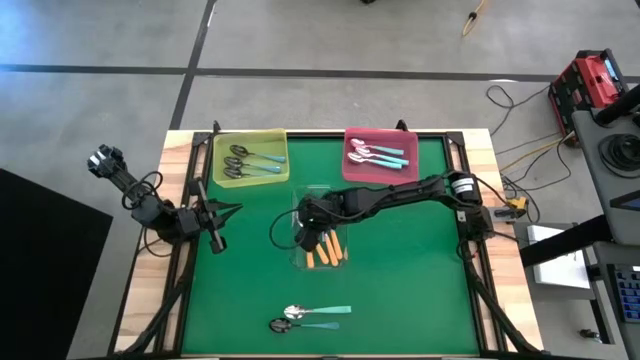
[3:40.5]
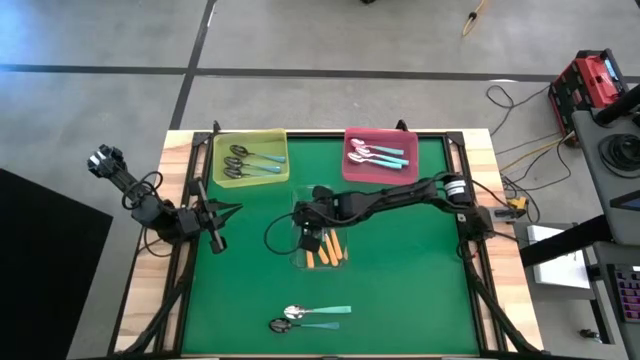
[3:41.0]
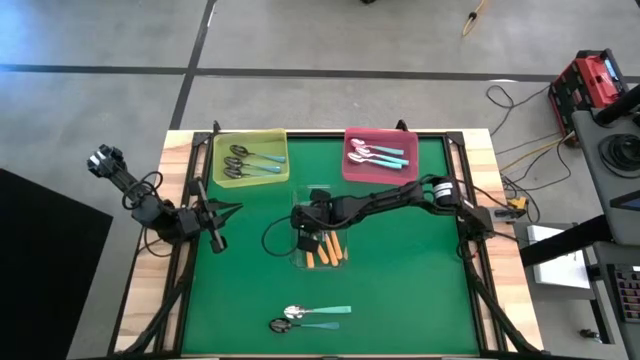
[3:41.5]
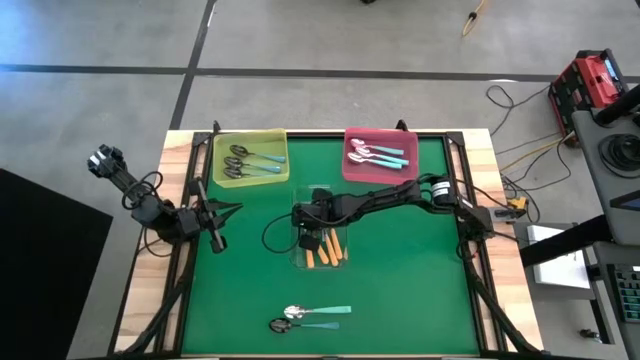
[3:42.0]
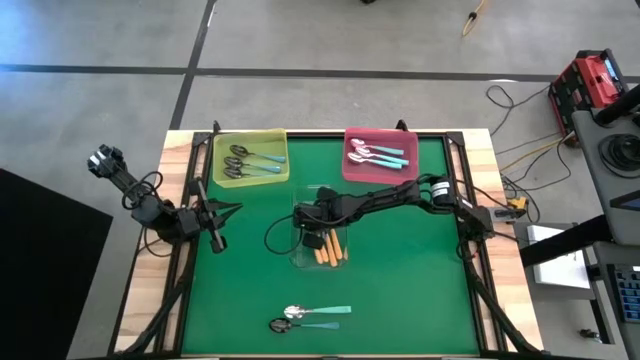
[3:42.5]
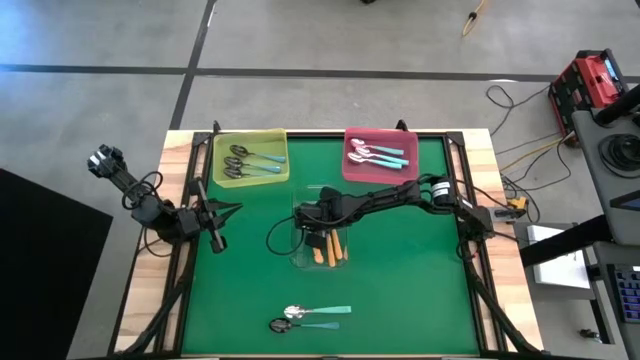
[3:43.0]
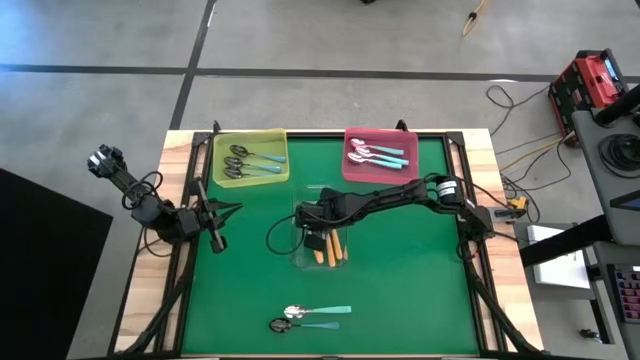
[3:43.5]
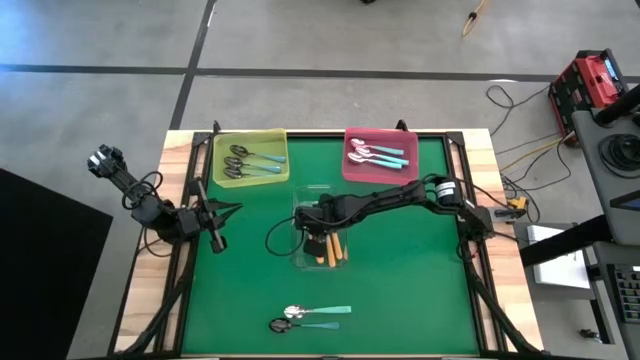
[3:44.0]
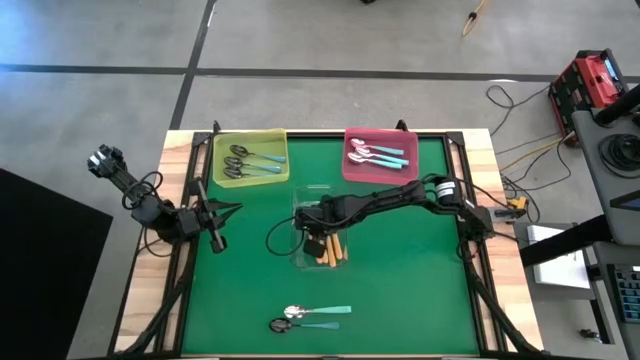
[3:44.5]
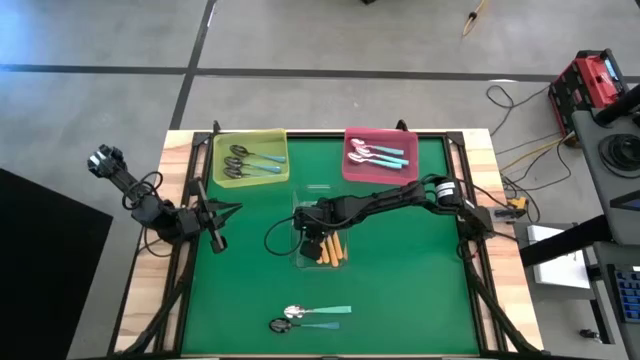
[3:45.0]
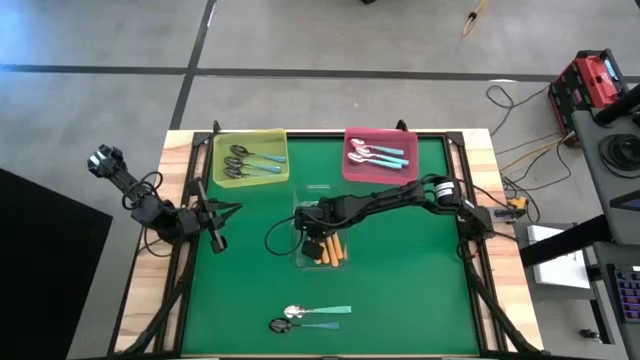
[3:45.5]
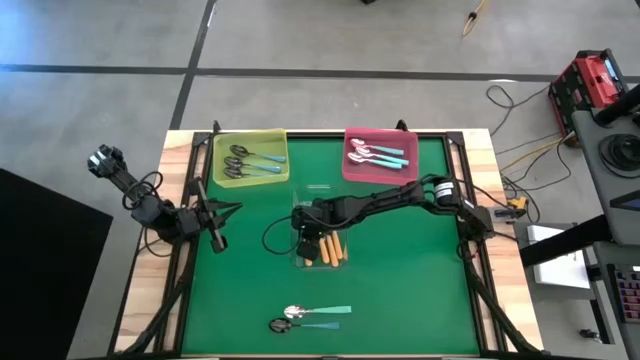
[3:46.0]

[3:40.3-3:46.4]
Task: Sort silverware by color (type)
Adjust the yellow spoon

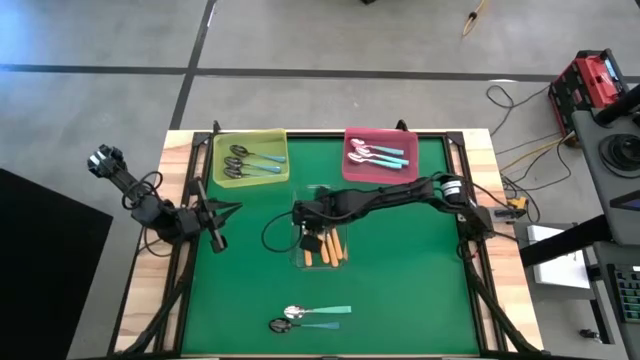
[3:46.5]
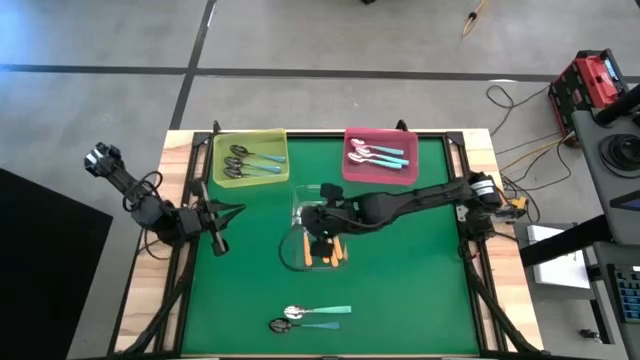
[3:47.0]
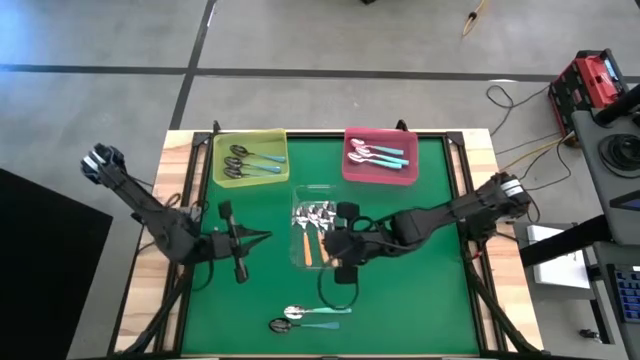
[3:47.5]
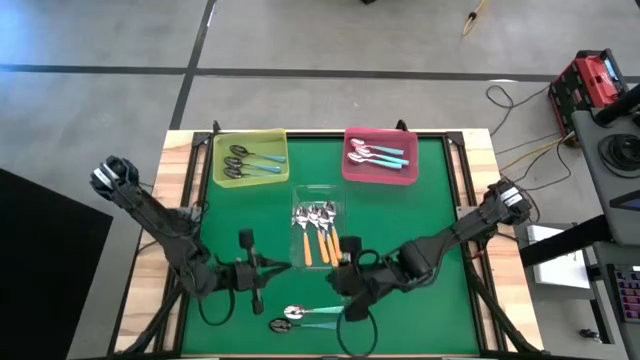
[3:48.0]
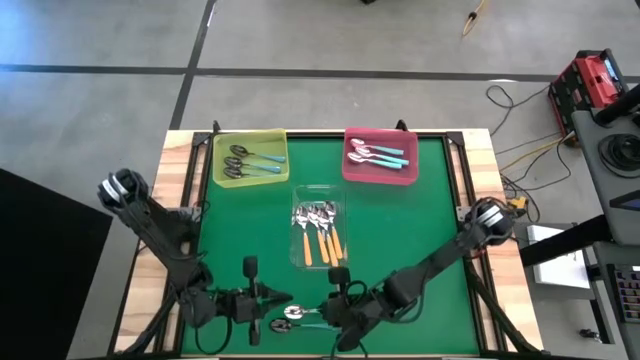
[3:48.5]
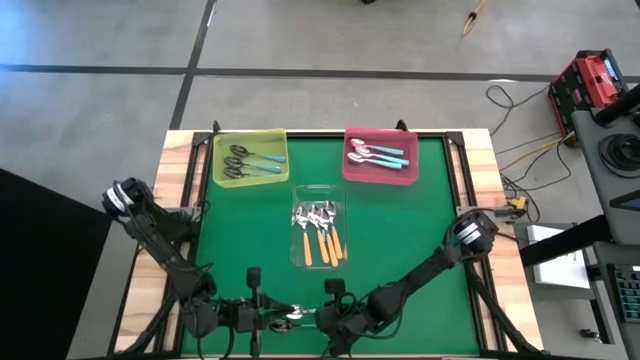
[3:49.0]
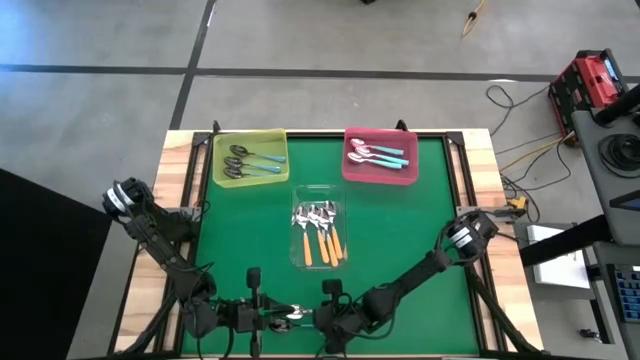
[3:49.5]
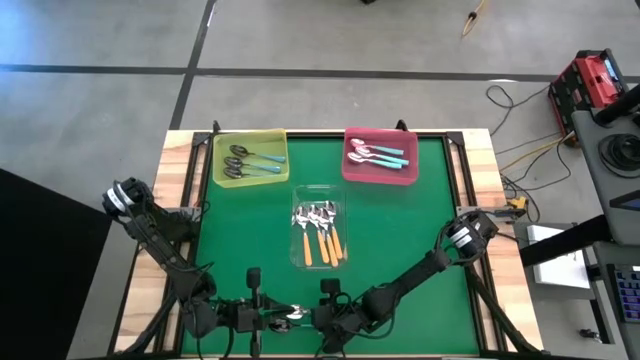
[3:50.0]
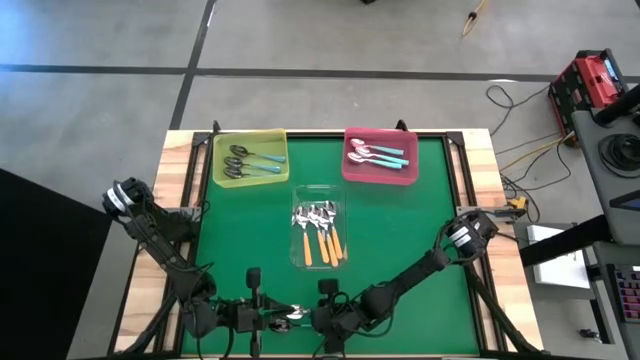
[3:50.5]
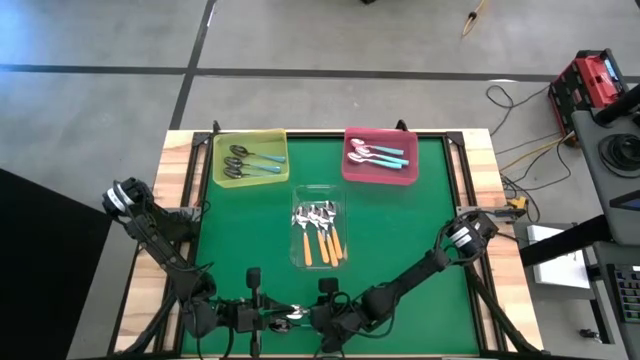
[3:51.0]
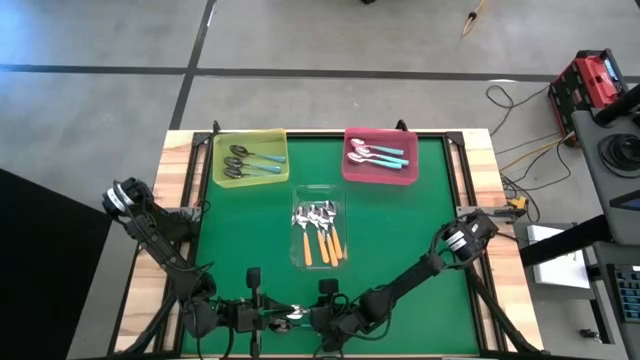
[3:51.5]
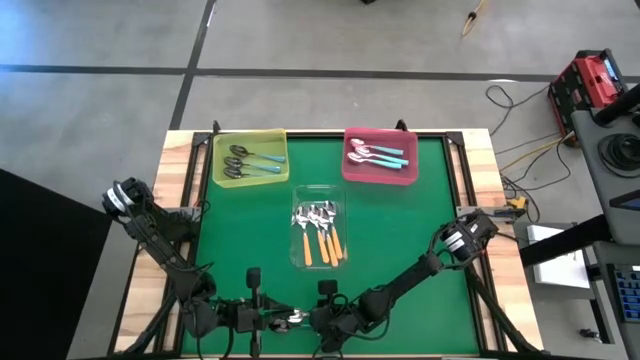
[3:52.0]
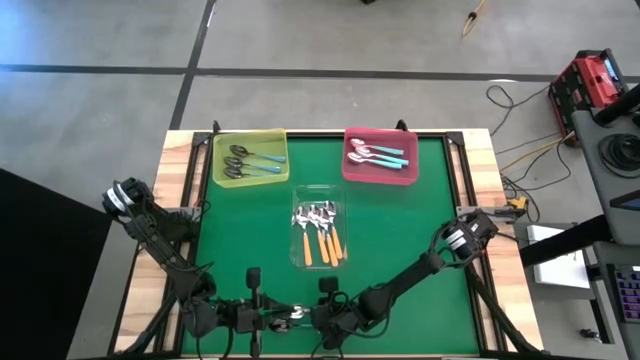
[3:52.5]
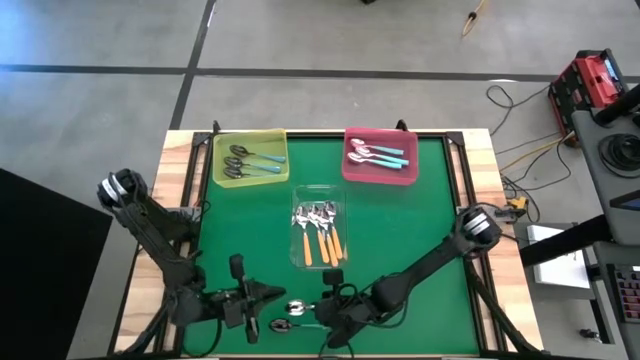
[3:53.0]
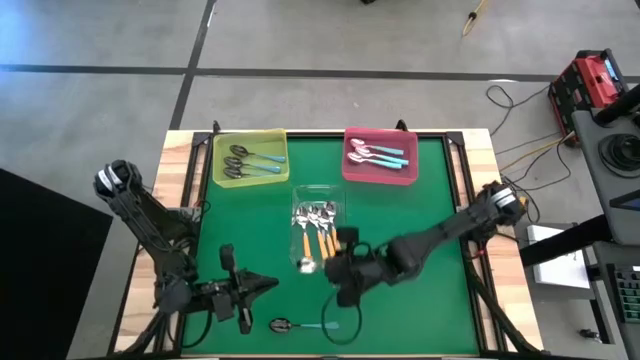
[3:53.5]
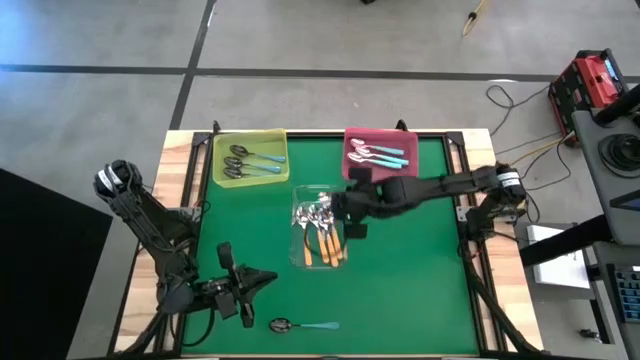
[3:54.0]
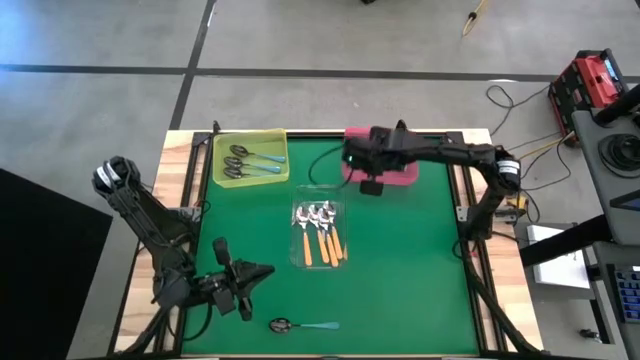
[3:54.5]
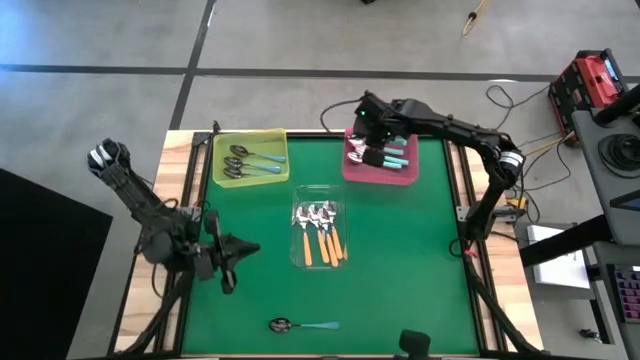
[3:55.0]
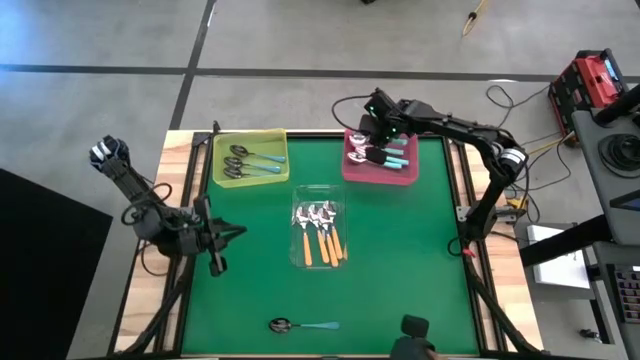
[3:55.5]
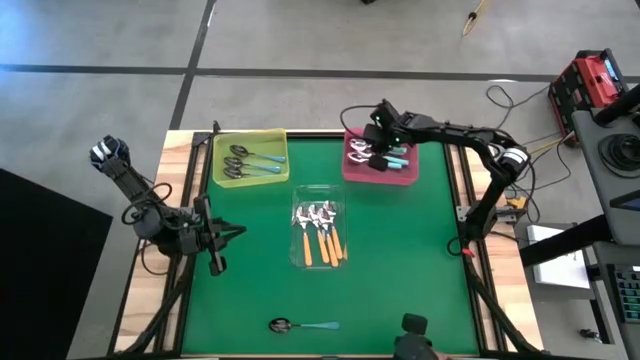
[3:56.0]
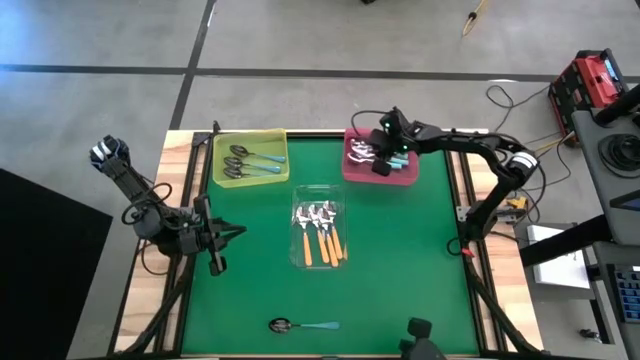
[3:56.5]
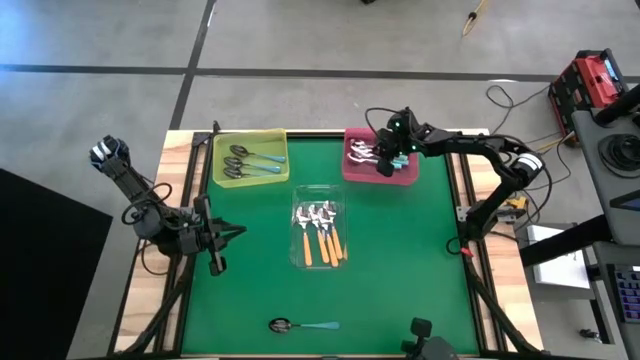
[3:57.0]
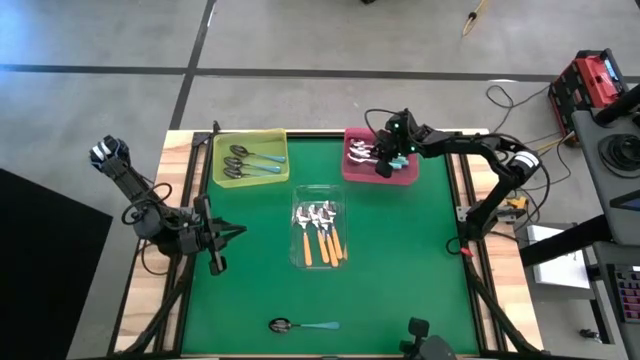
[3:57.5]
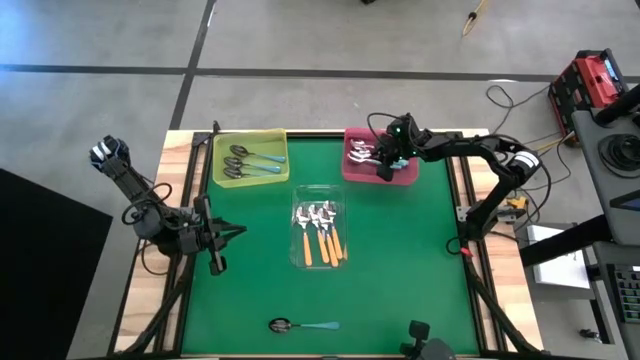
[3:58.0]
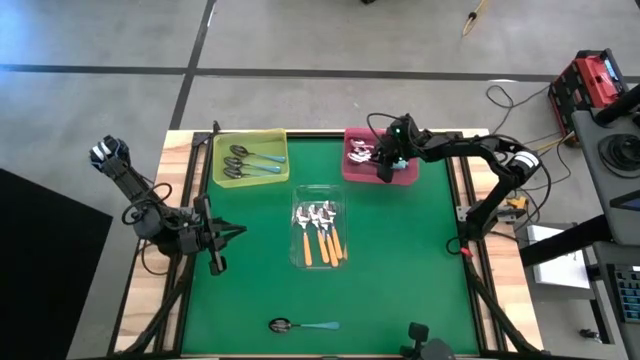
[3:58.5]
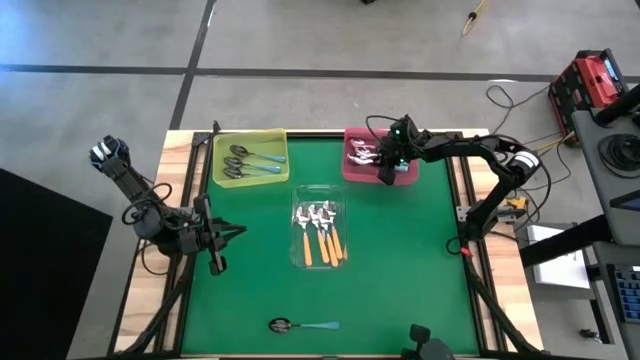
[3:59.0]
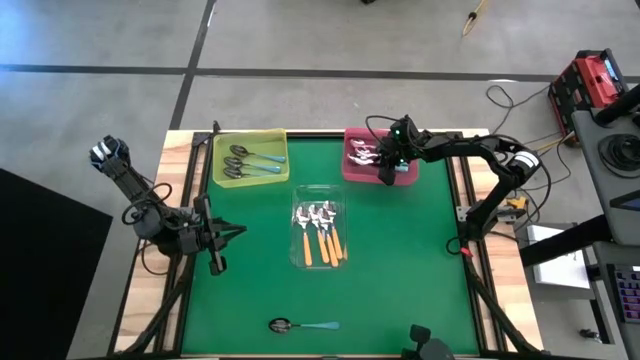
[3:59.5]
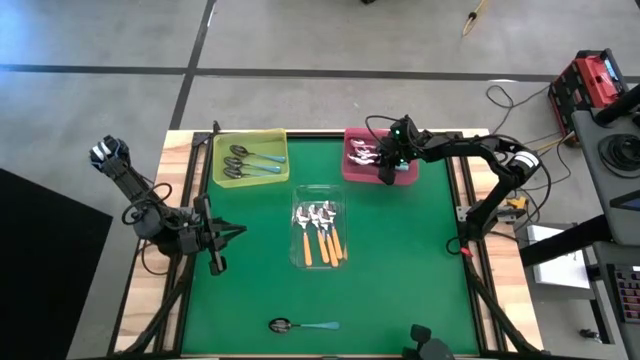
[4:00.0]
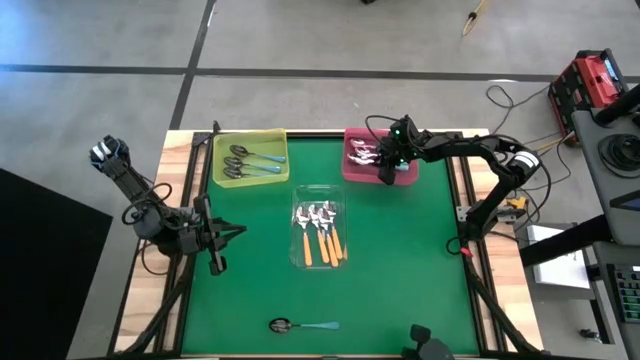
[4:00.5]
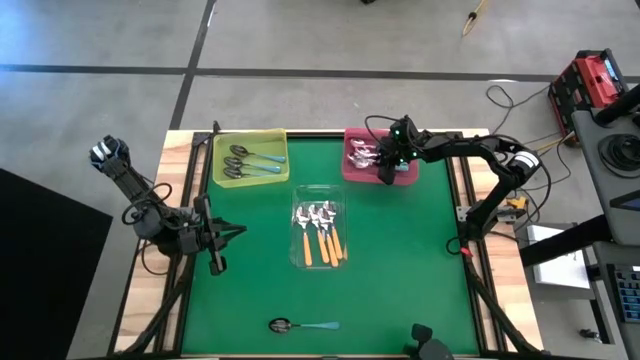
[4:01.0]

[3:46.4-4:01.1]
Put the light blue spoon into the pink bin
